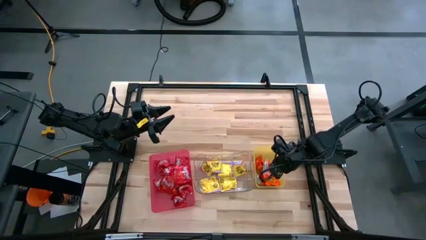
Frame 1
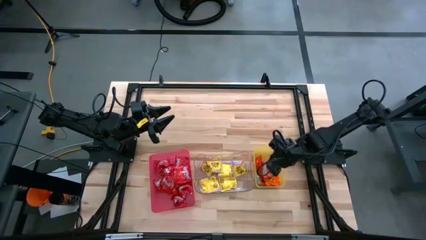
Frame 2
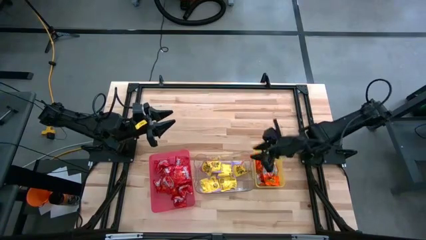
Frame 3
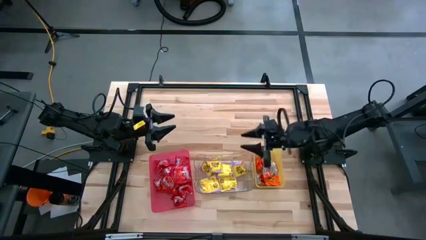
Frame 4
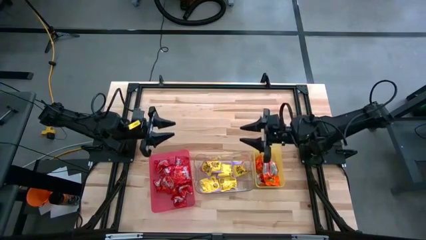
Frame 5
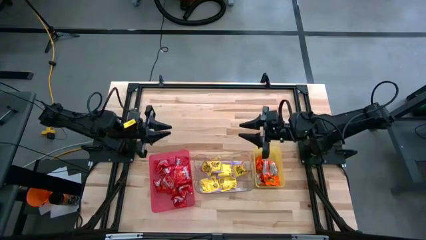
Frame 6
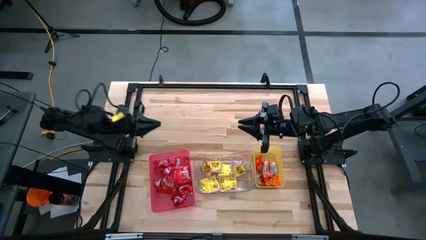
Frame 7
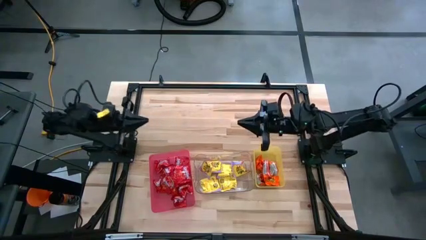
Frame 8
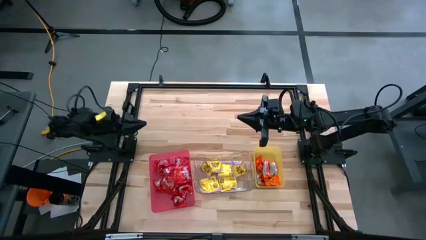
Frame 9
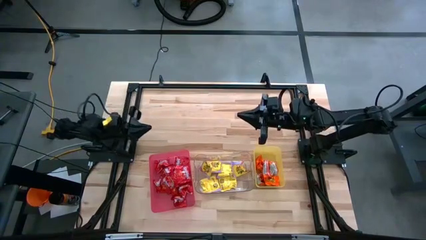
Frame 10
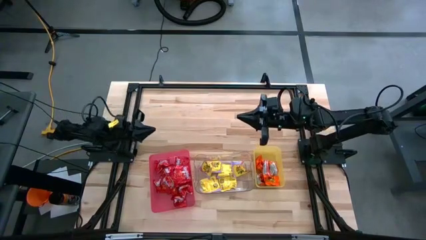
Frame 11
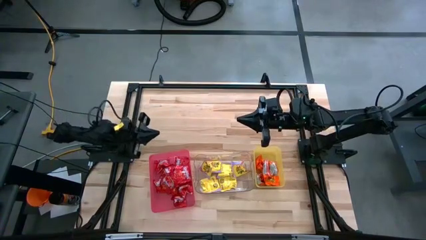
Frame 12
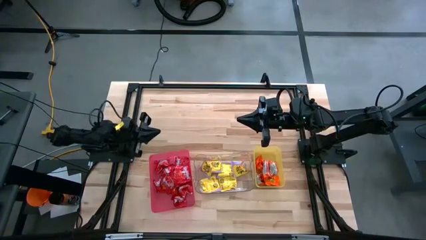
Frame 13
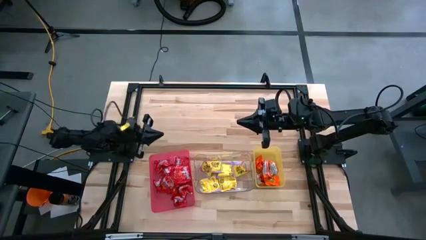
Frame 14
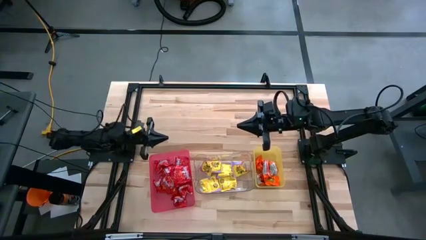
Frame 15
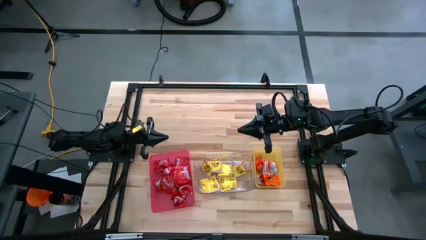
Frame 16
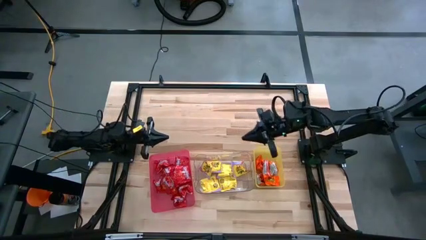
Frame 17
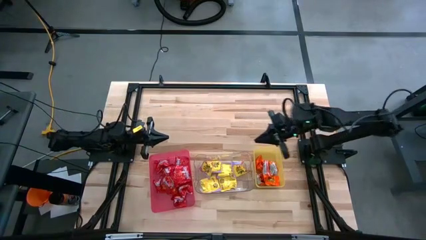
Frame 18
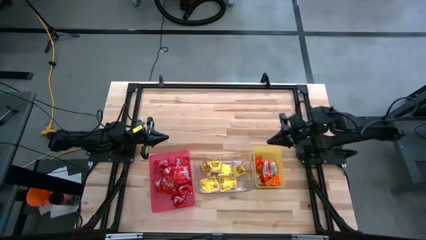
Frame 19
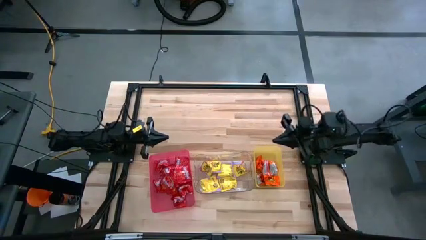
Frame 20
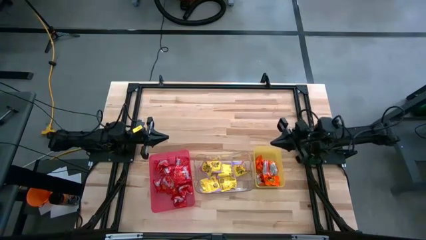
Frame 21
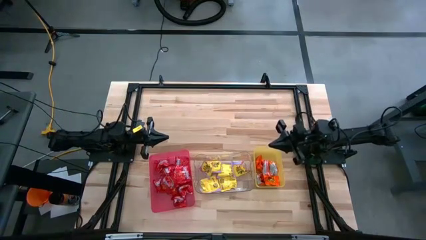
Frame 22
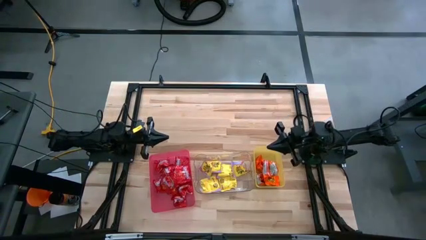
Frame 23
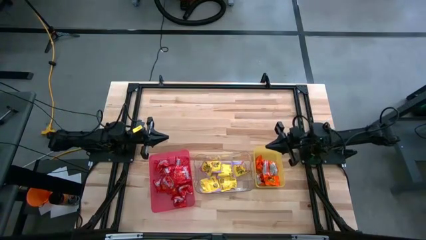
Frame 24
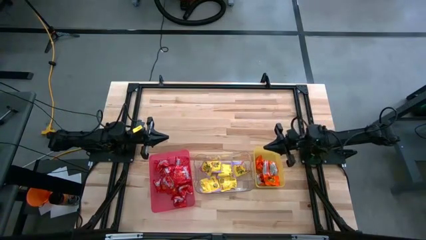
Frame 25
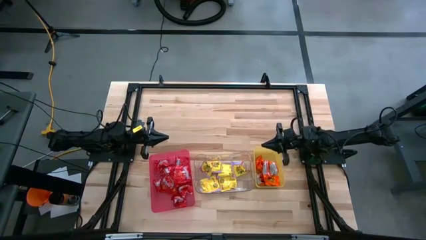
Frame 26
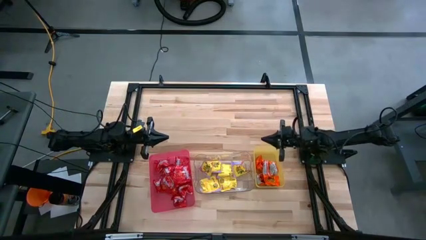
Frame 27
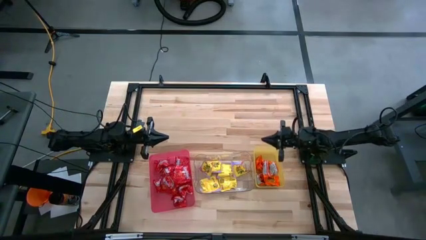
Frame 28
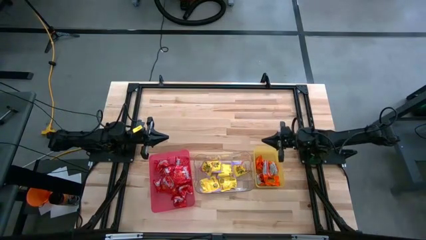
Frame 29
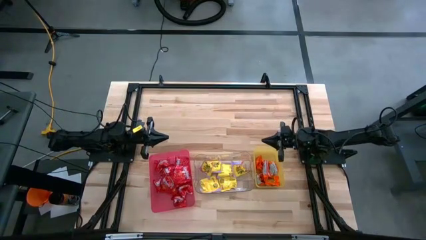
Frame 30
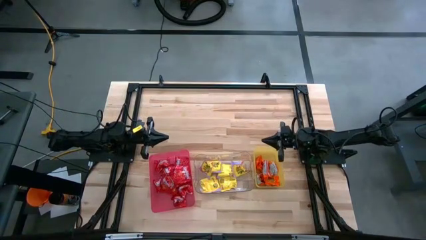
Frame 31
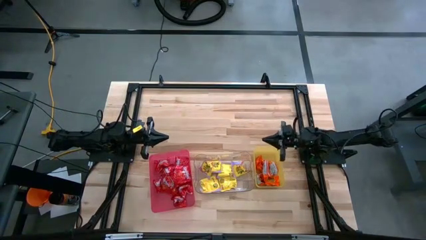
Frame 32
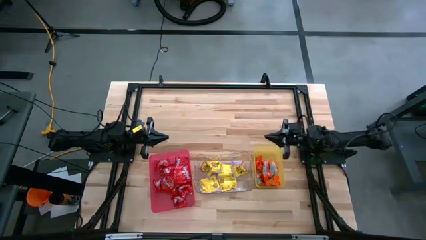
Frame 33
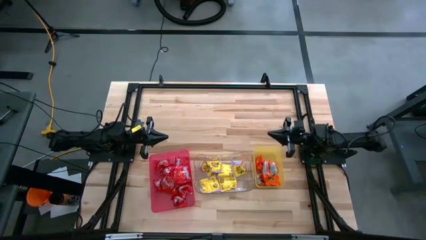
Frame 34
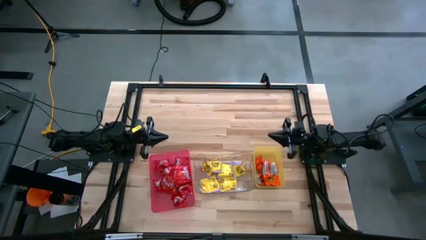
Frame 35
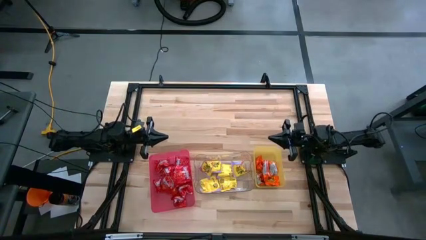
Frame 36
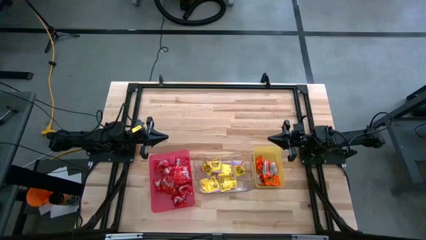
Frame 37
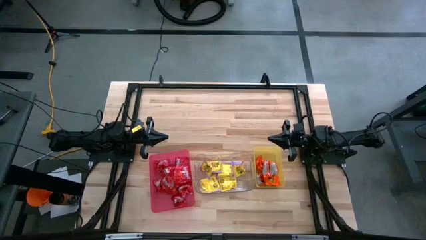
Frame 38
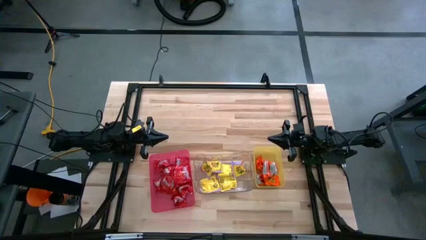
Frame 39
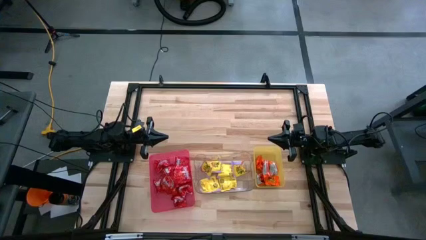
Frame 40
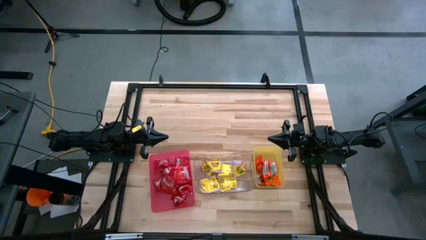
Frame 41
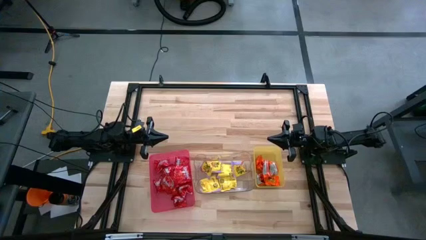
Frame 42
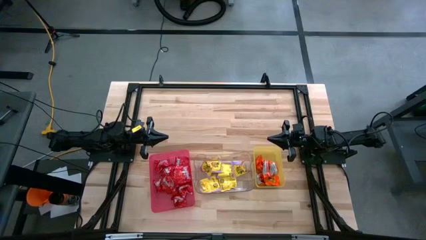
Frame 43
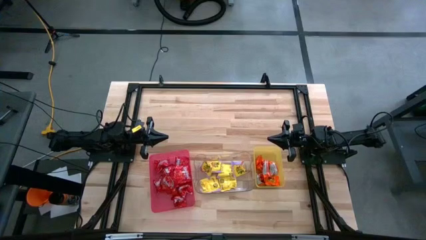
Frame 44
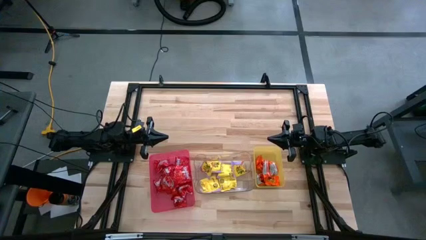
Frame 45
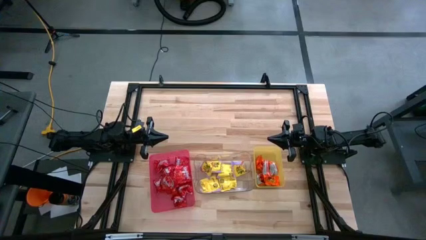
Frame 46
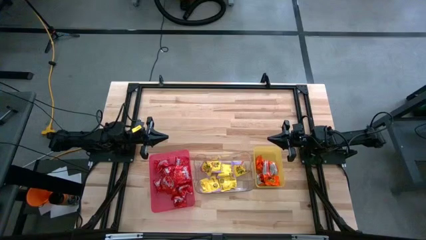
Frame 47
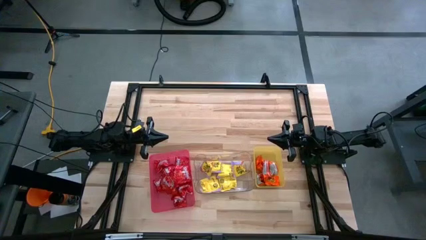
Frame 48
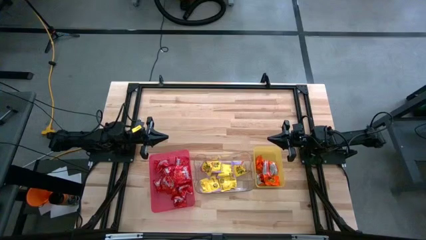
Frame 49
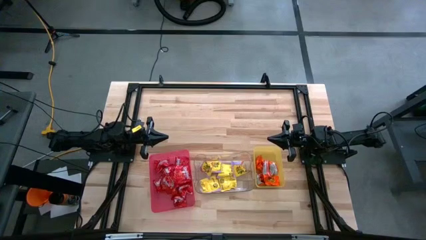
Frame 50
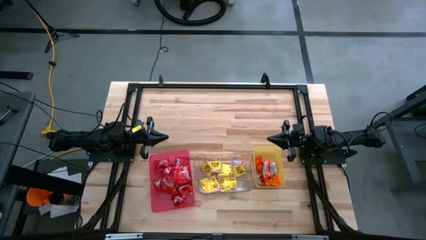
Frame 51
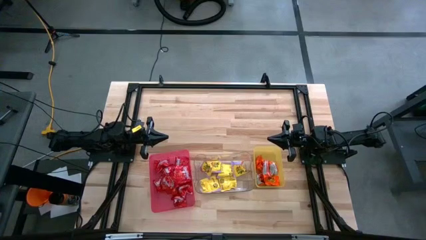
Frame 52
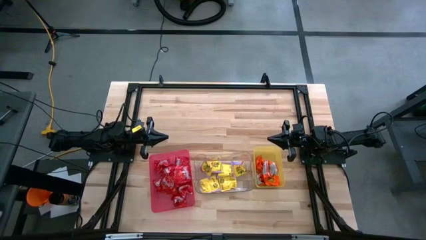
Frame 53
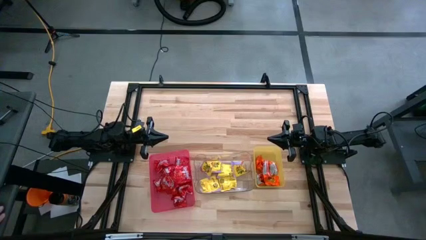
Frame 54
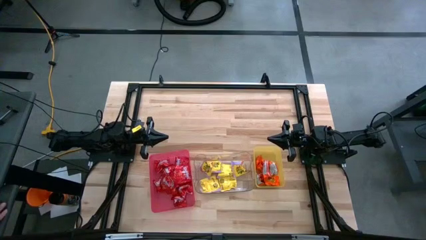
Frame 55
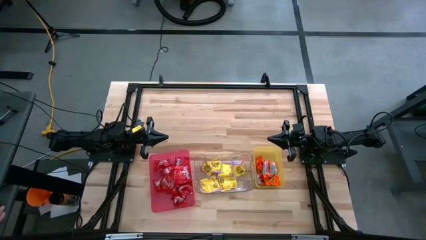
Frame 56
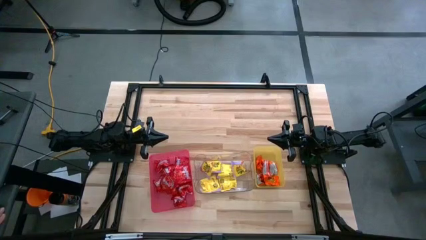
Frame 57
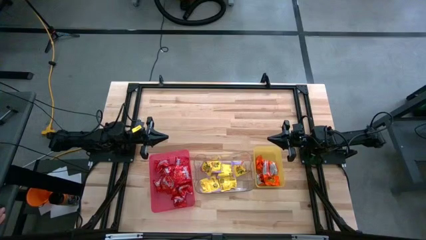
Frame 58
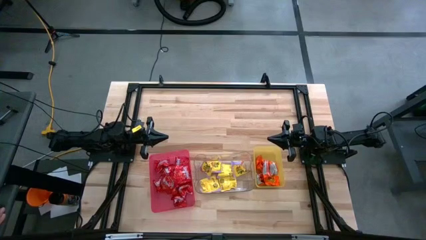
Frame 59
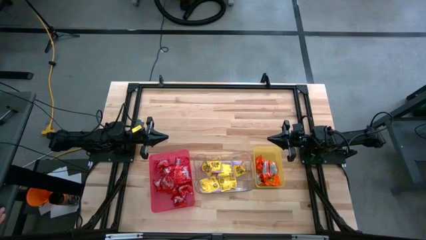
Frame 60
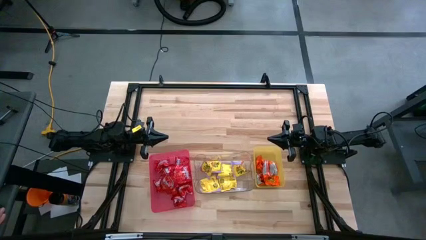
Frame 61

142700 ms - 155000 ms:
Task: Sort candy
Return to Home Position
